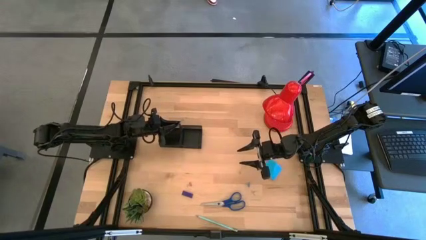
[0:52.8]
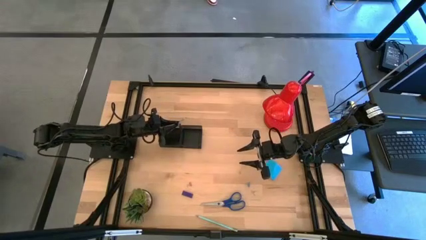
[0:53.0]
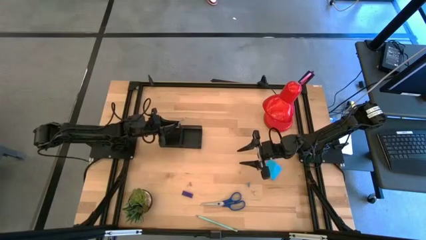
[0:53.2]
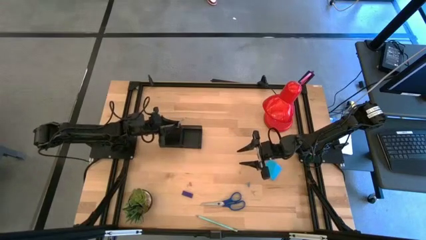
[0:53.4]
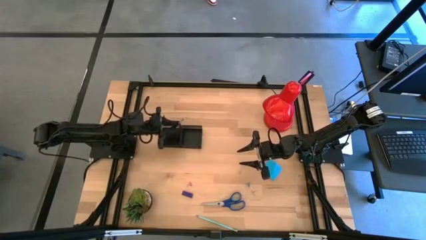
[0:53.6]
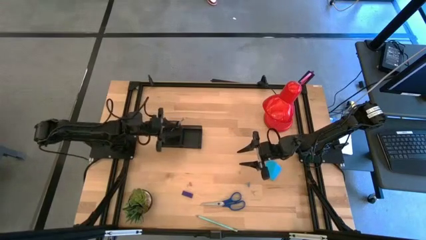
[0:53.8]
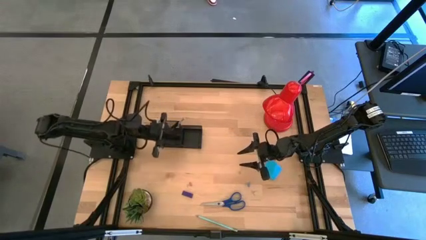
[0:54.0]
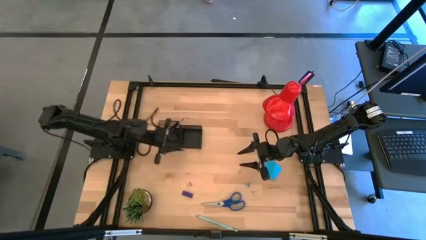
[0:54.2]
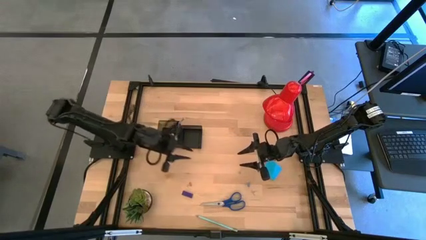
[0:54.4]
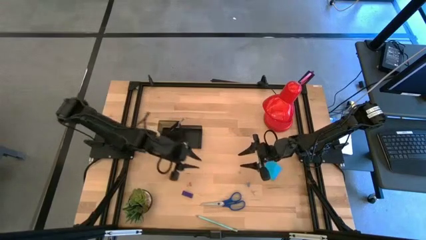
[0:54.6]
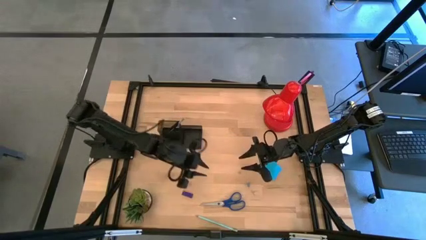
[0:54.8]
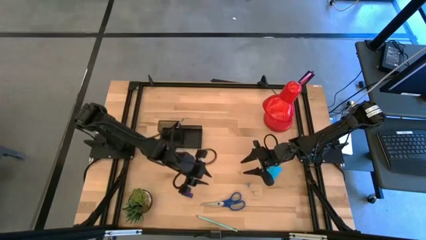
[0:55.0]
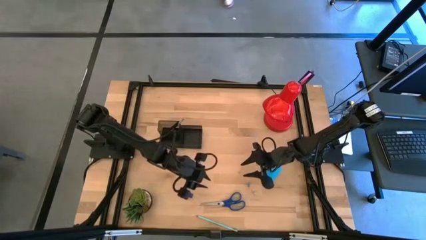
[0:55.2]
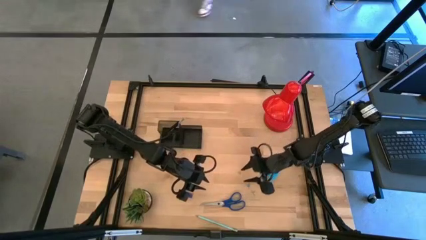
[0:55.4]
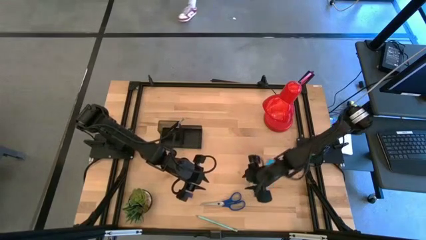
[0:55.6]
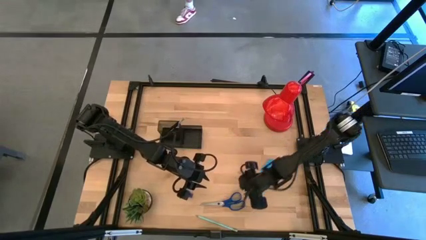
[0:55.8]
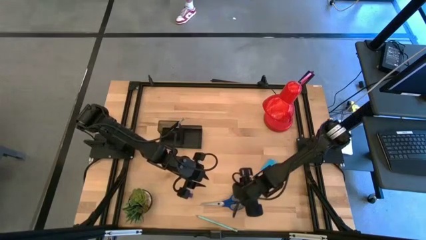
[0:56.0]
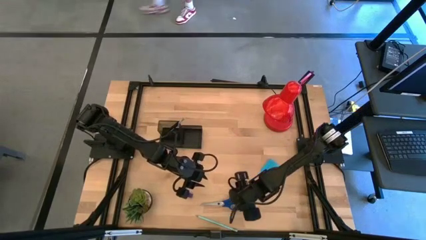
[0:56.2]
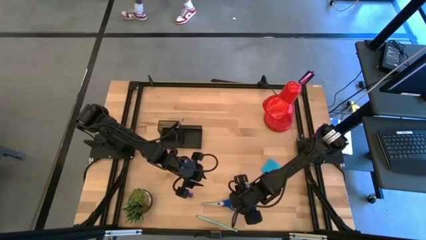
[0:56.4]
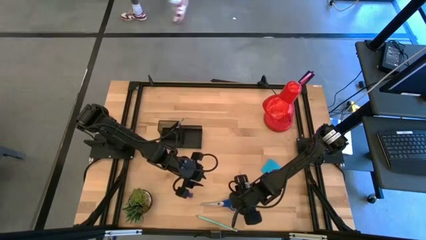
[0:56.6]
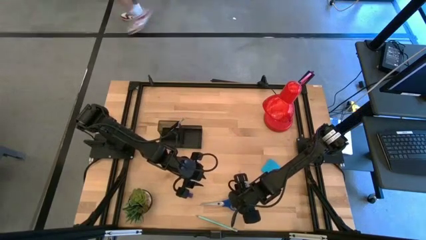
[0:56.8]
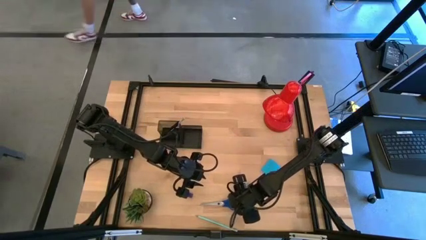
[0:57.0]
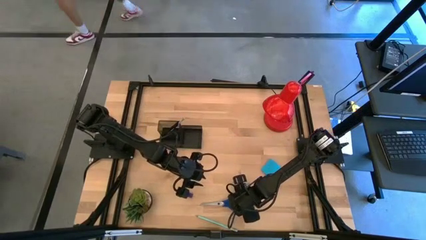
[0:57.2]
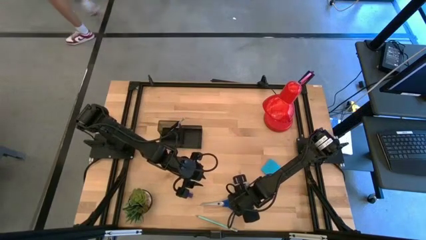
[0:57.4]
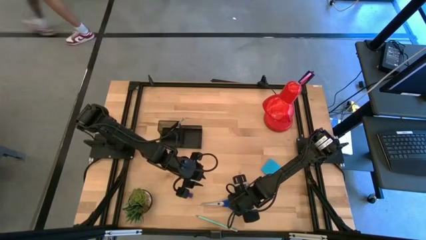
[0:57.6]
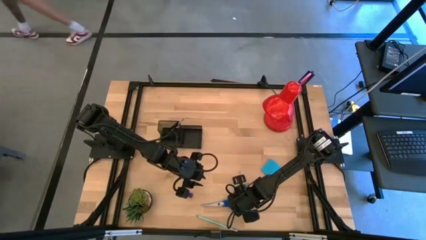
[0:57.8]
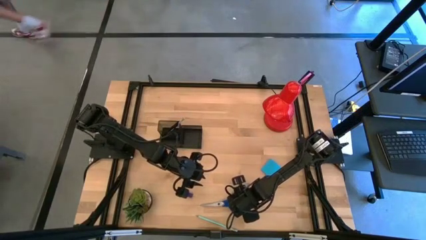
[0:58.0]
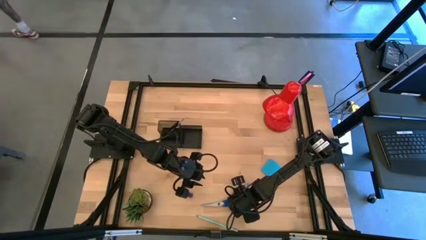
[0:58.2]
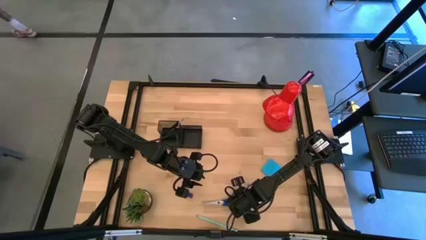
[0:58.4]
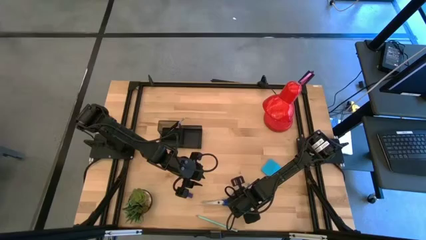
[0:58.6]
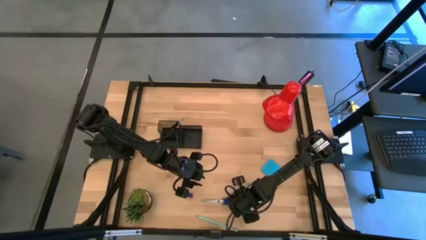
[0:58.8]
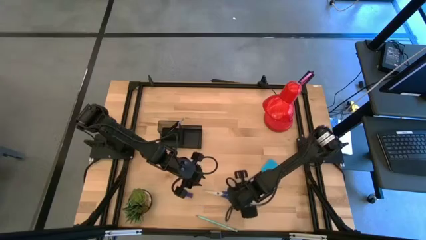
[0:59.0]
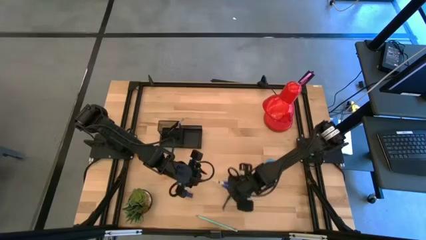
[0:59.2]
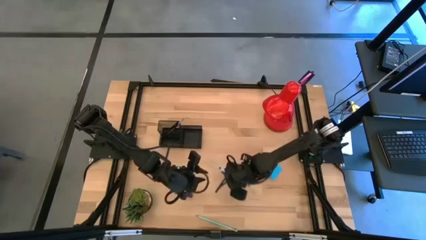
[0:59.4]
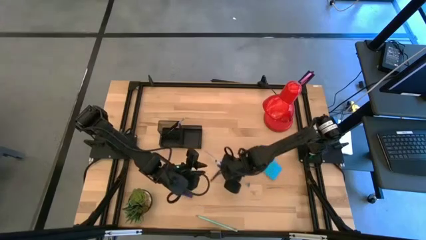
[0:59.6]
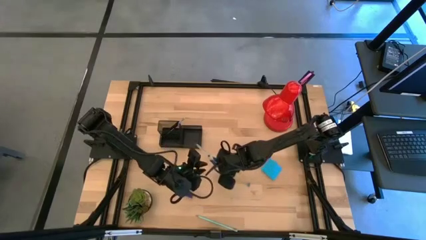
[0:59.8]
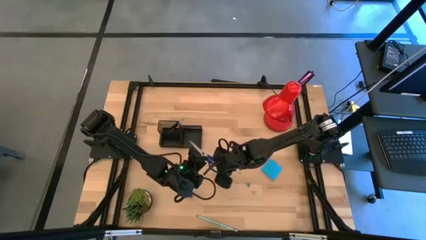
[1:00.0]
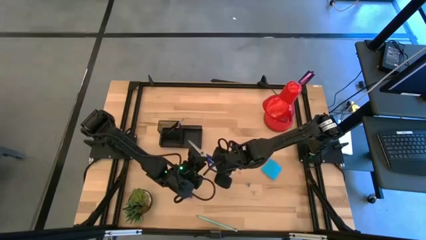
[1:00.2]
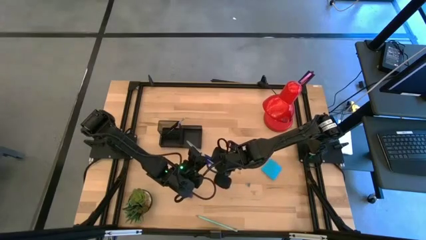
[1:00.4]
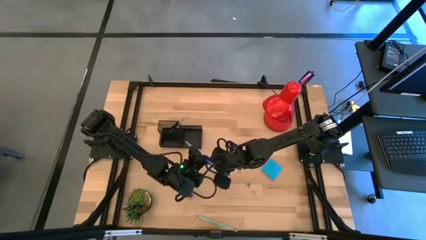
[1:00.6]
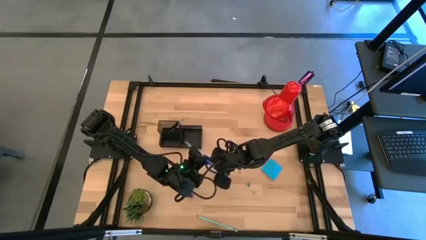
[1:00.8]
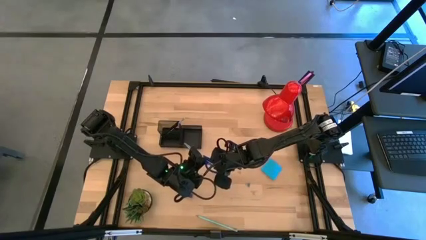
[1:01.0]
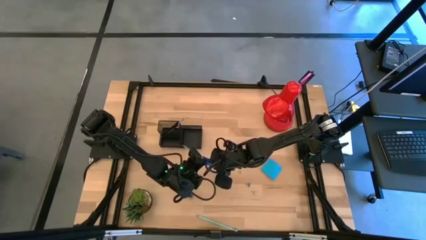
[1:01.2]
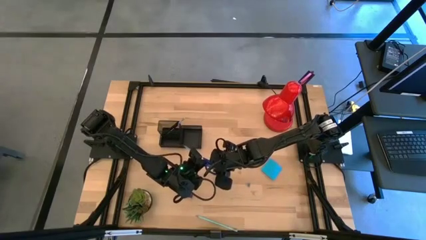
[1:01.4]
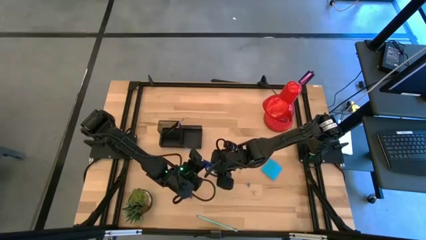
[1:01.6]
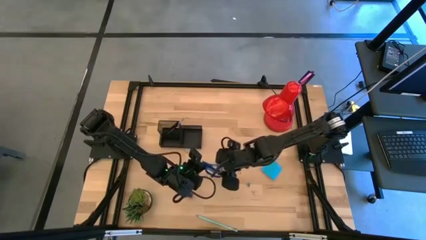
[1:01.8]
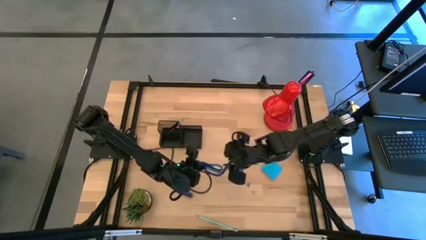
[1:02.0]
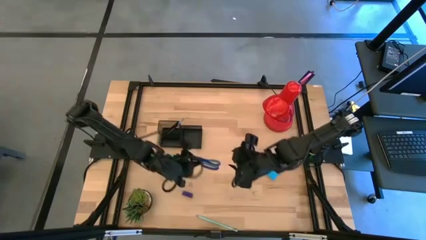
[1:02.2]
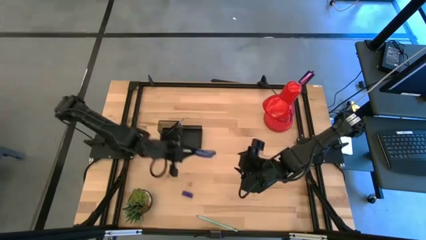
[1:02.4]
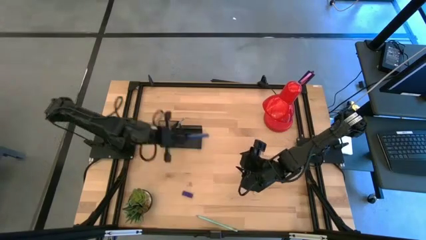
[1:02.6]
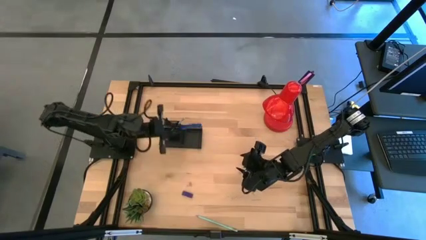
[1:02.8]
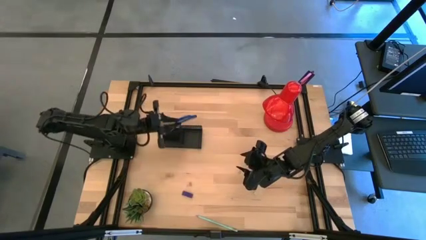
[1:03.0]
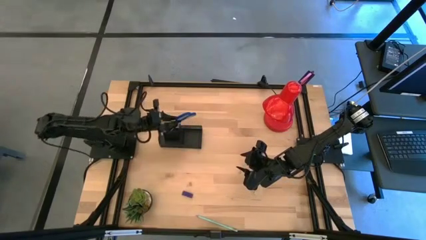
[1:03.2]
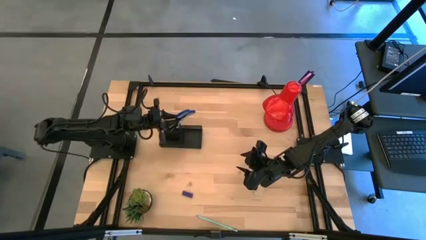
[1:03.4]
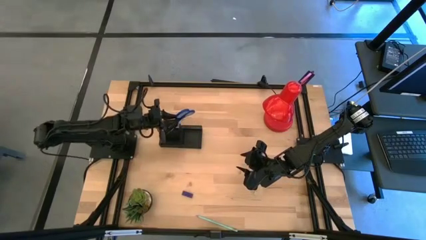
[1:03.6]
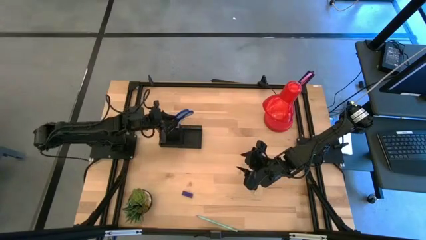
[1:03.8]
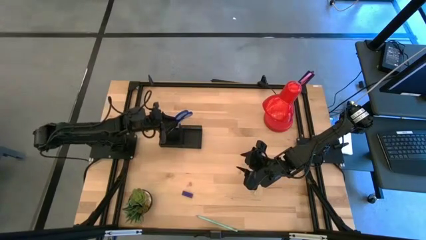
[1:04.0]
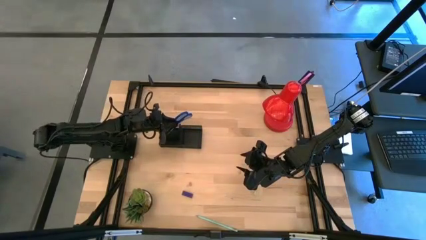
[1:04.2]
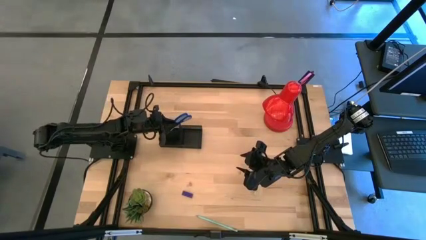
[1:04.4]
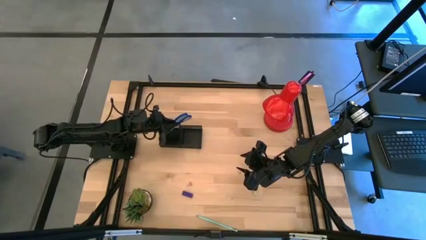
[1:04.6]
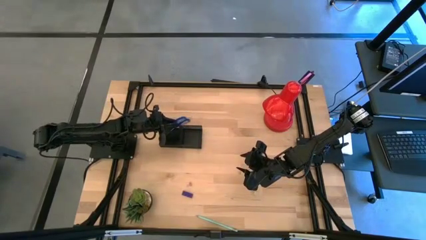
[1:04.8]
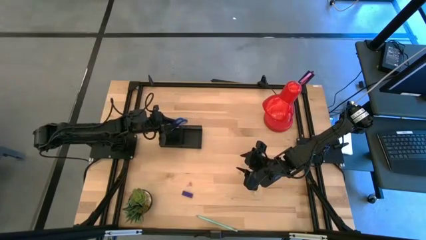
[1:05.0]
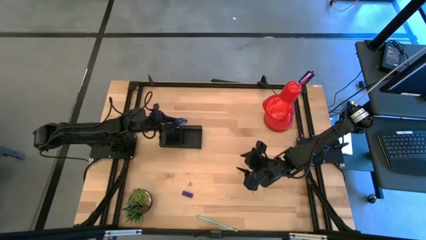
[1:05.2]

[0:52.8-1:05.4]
Task: Pick and place office supplies into organizer
Put the blue scissors into the black desk organizer
